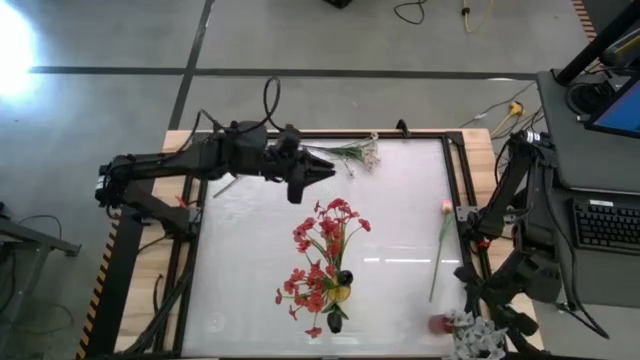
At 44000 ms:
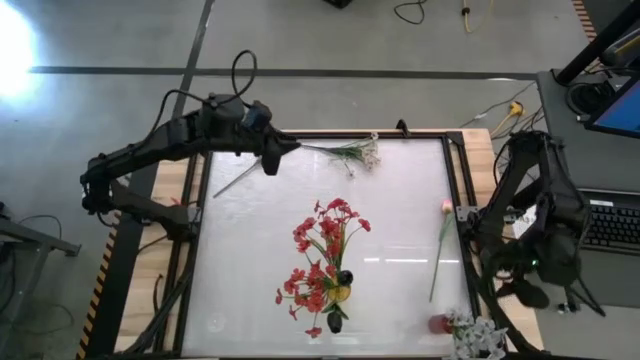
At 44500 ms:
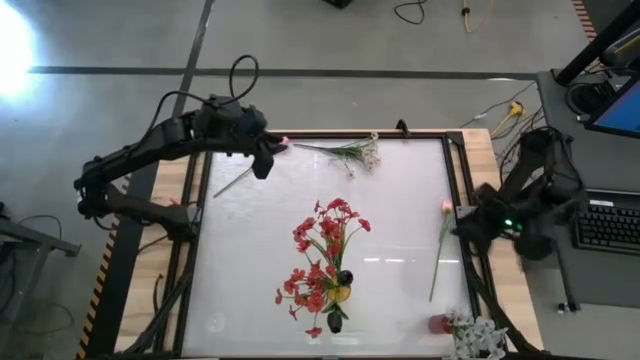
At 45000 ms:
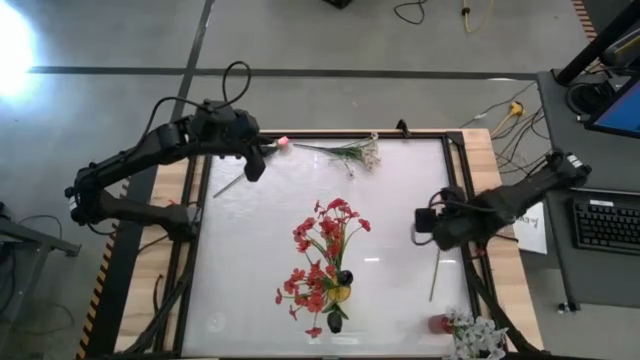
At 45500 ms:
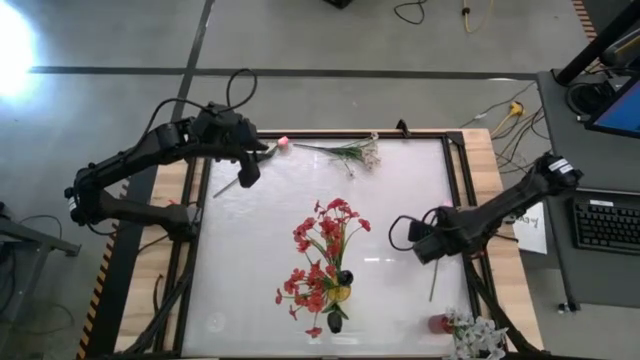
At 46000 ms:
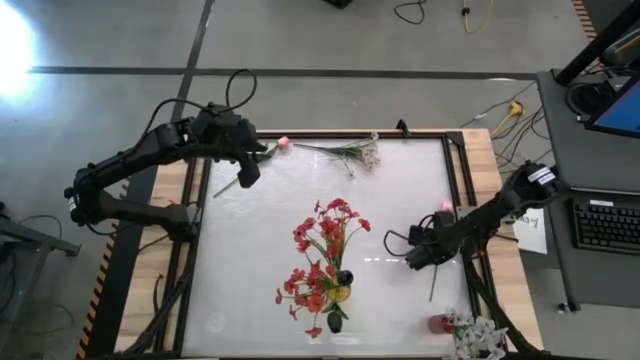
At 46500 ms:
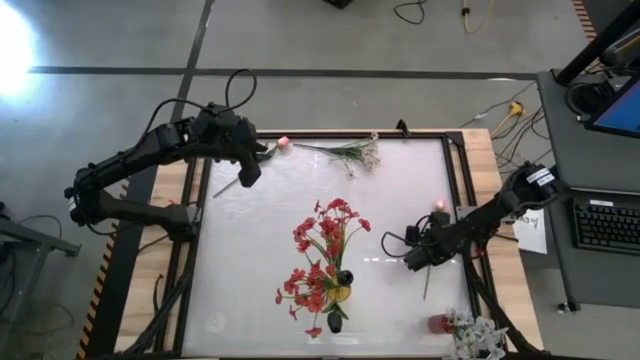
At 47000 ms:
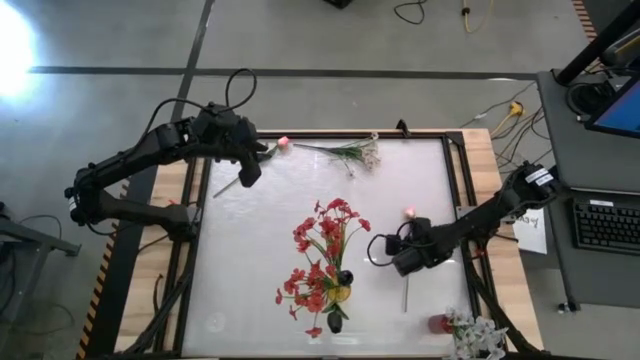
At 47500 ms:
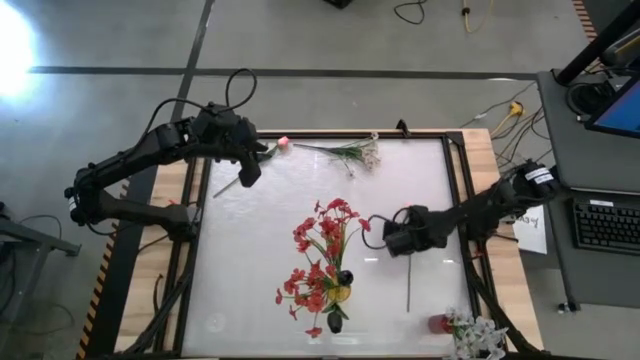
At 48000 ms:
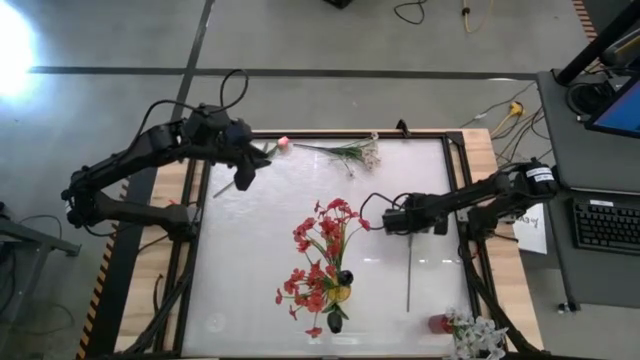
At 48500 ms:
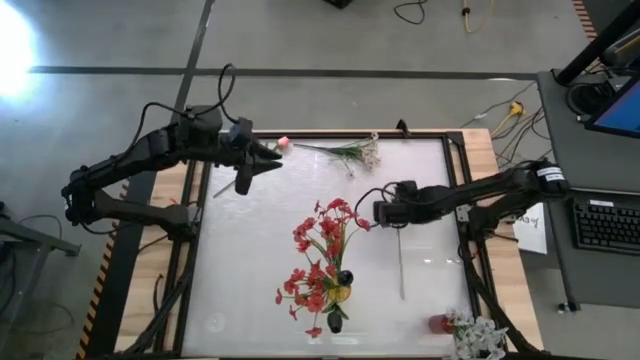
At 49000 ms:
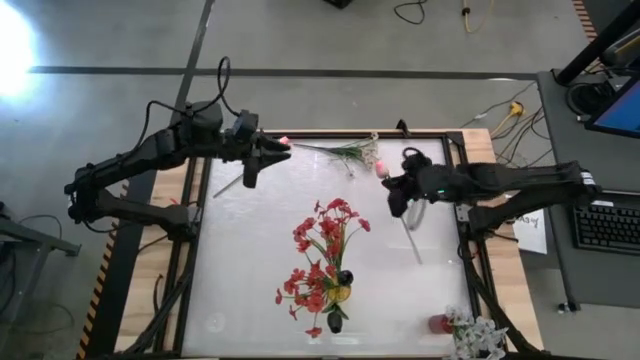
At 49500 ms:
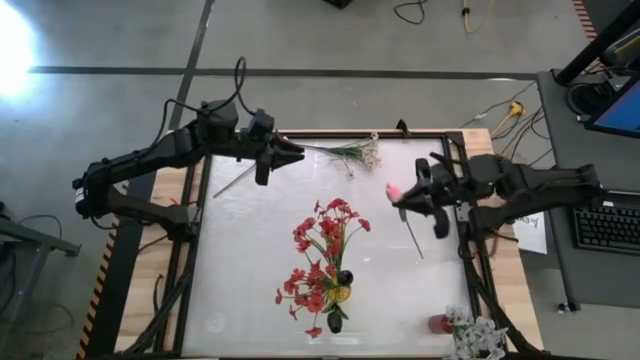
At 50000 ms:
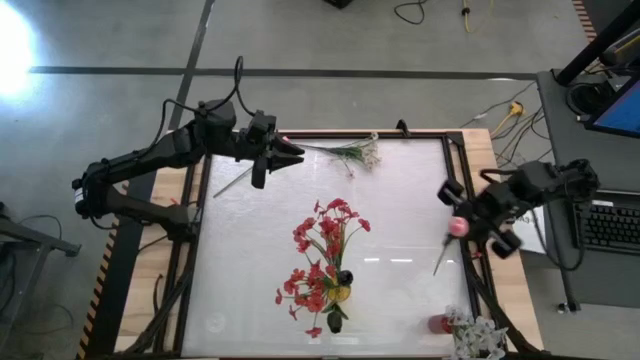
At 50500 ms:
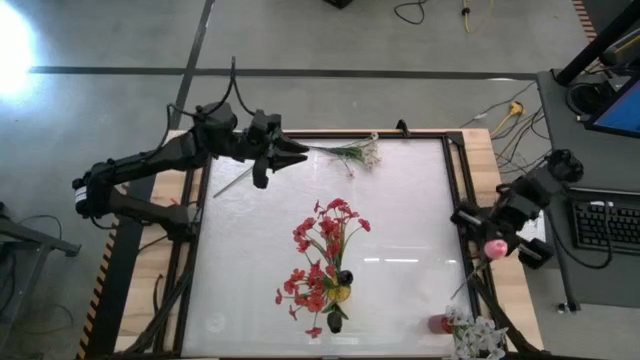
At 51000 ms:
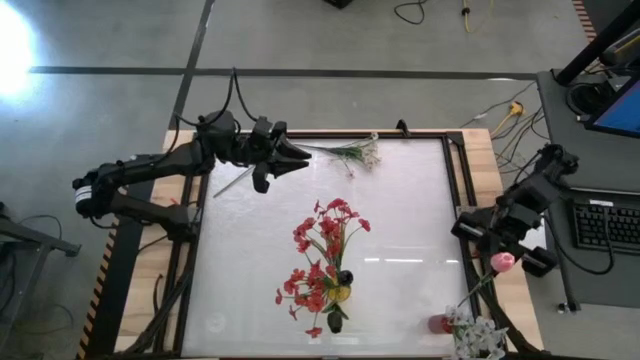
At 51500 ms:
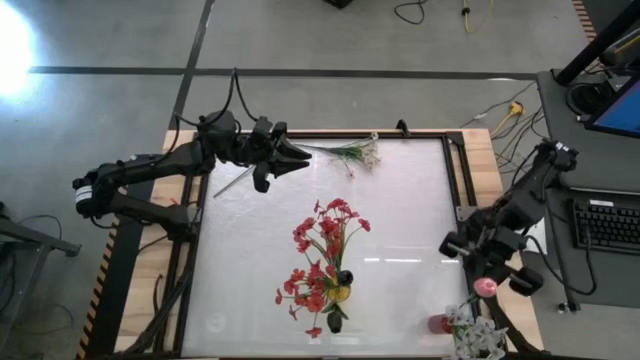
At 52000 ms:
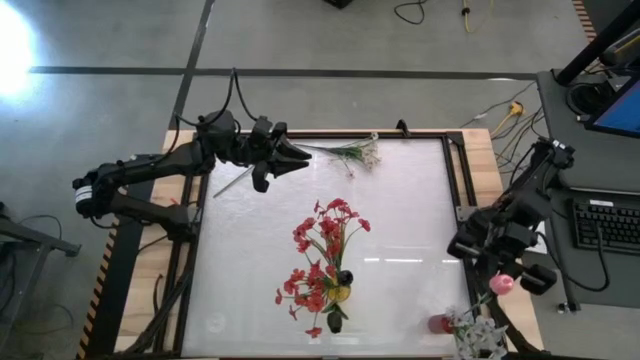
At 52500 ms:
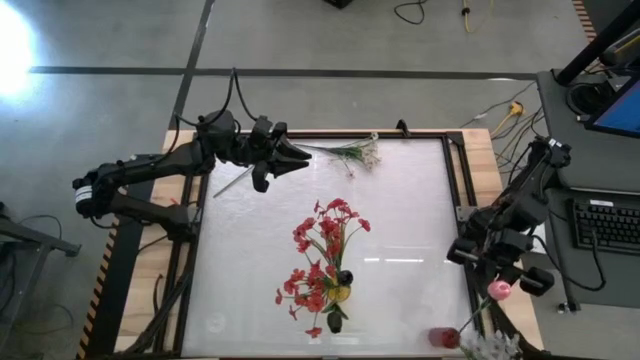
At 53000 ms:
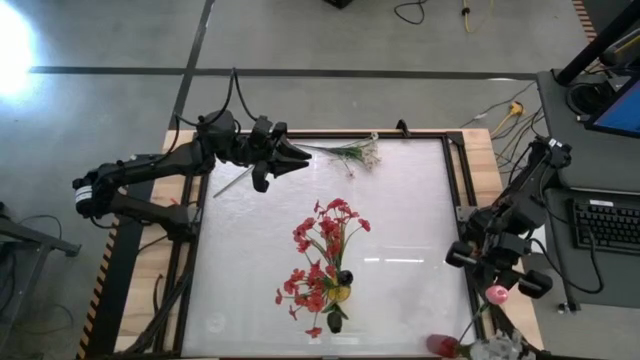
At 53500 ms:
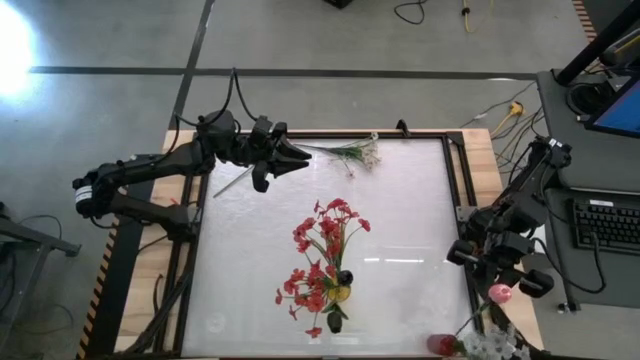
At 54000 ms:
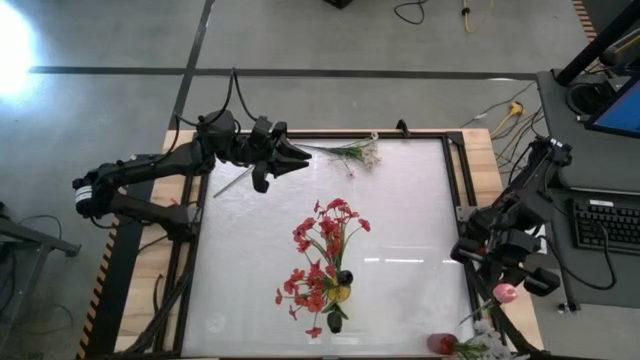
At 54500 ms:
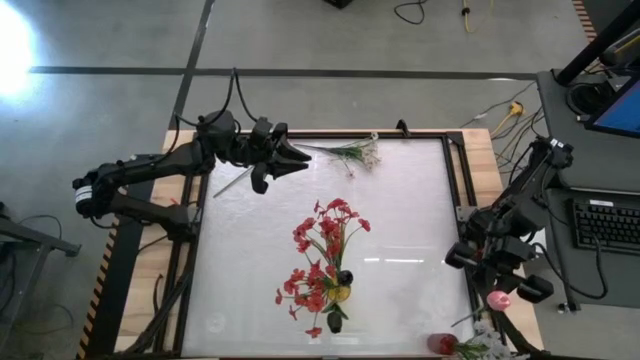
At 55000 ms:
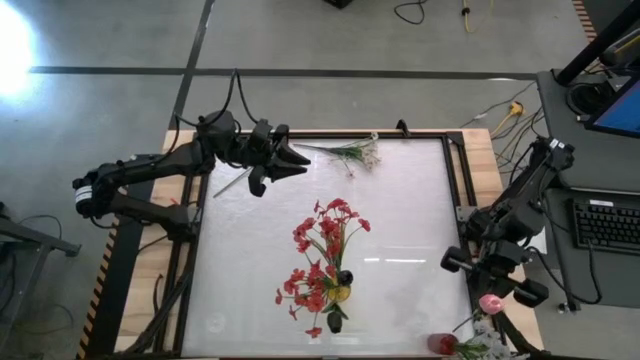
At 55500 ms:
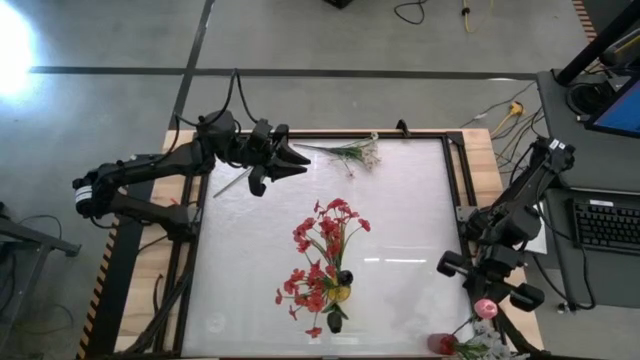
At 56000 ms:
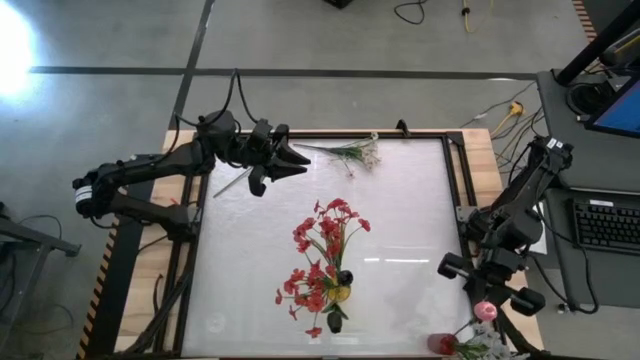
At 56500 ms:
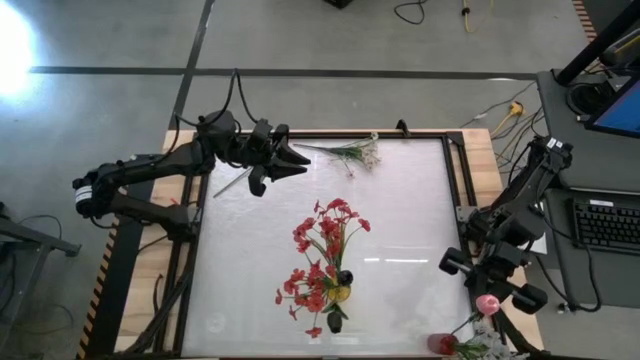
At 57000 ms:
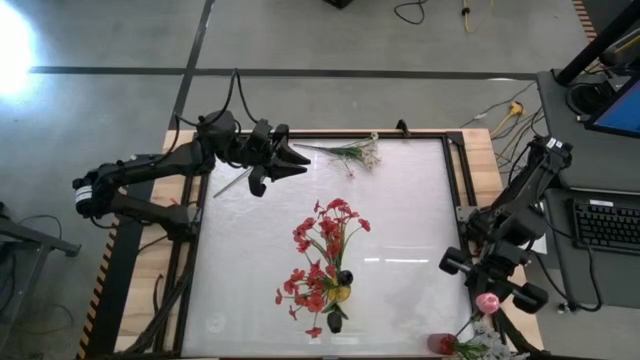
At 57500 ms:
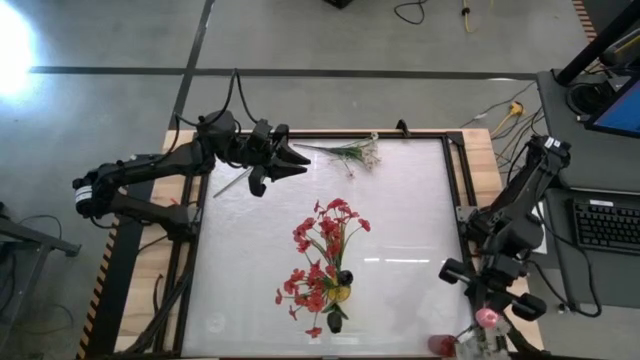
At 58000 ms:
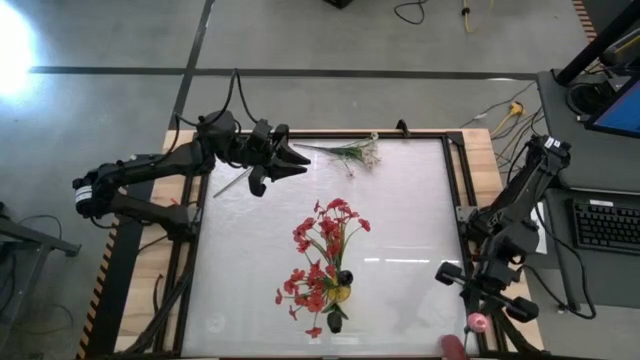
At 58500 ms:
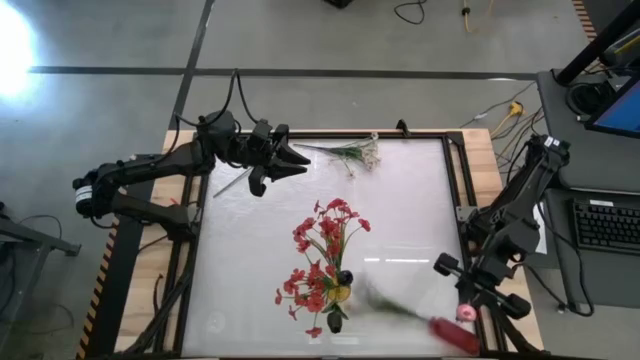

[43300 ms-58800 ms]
Task: Sort flowers into vase by color
Put the right pink flower into the red vase

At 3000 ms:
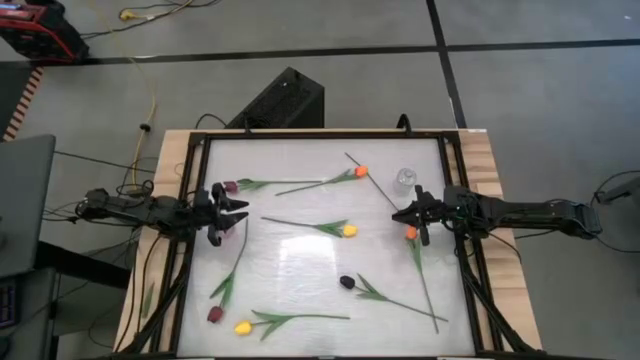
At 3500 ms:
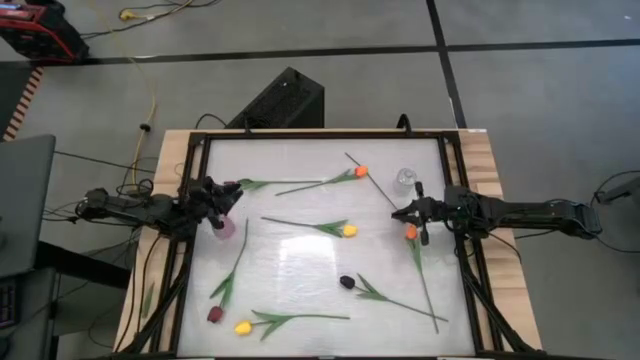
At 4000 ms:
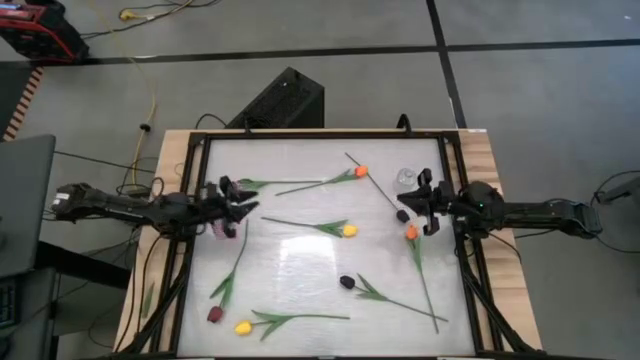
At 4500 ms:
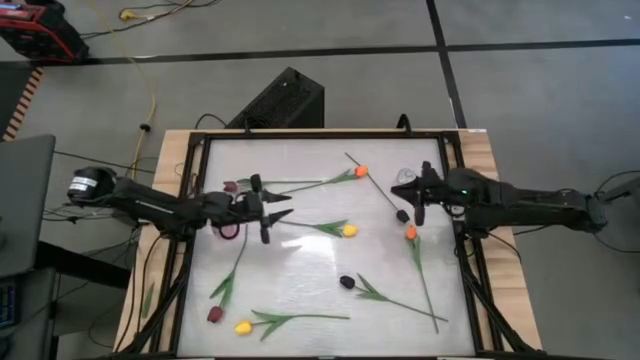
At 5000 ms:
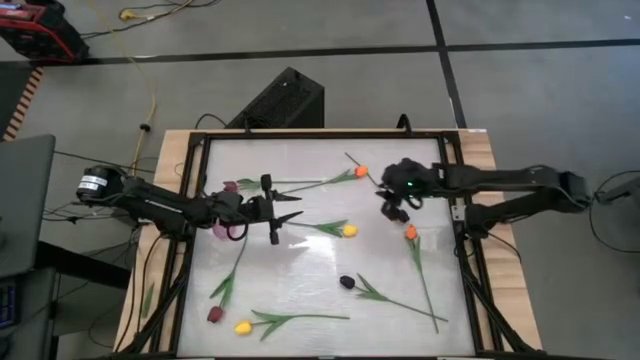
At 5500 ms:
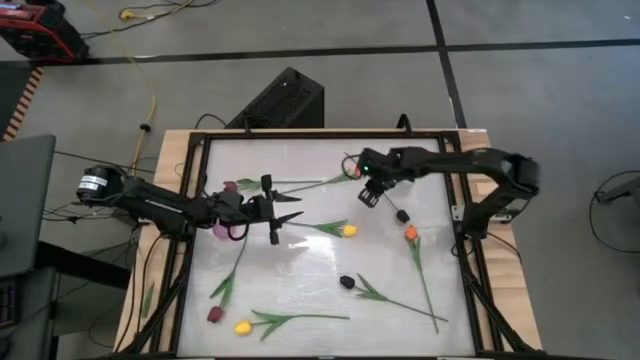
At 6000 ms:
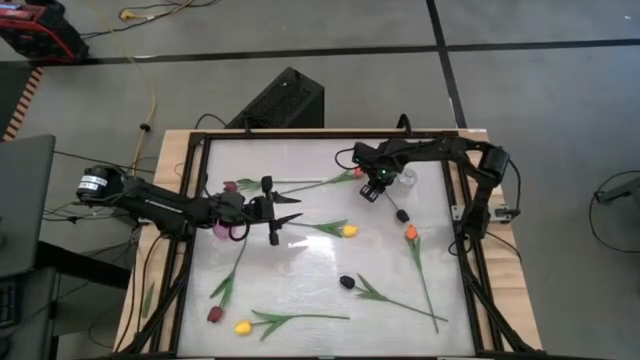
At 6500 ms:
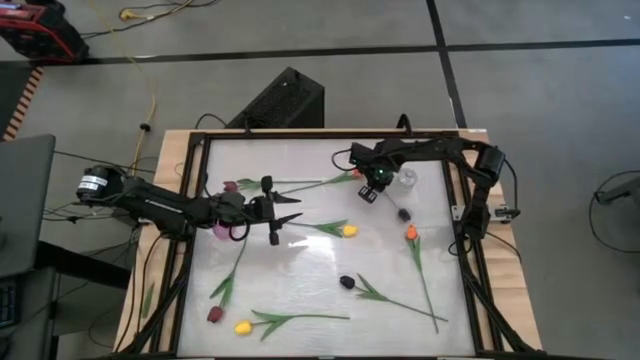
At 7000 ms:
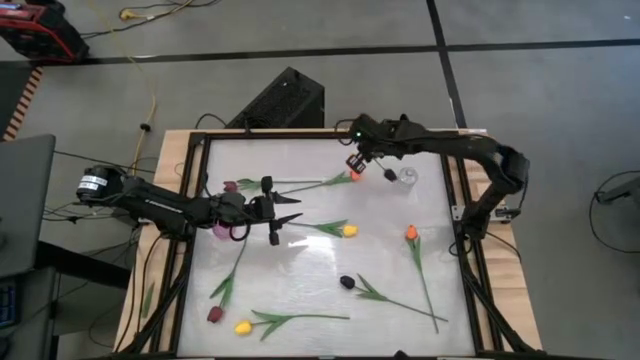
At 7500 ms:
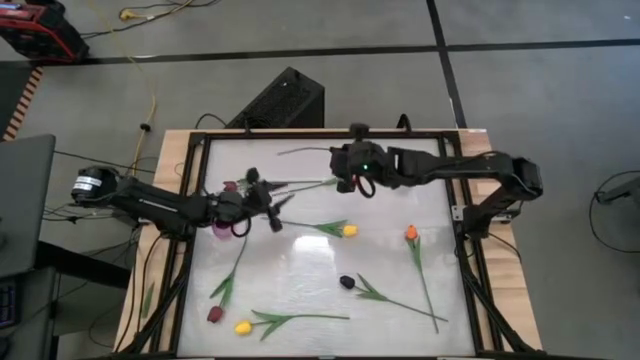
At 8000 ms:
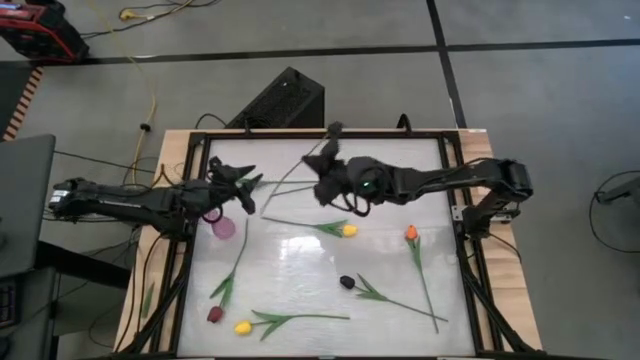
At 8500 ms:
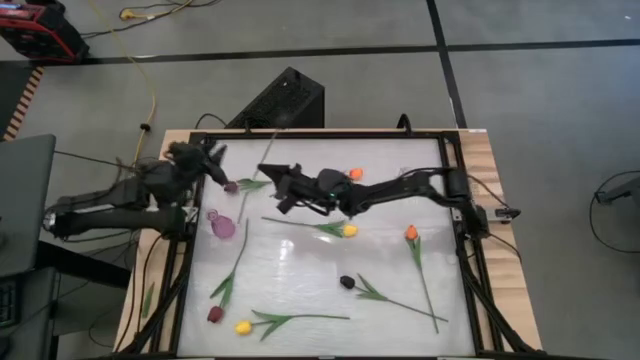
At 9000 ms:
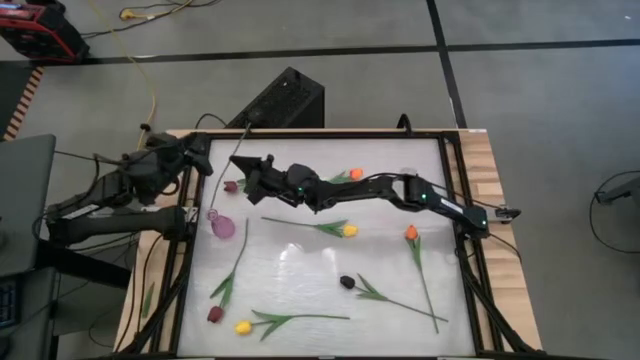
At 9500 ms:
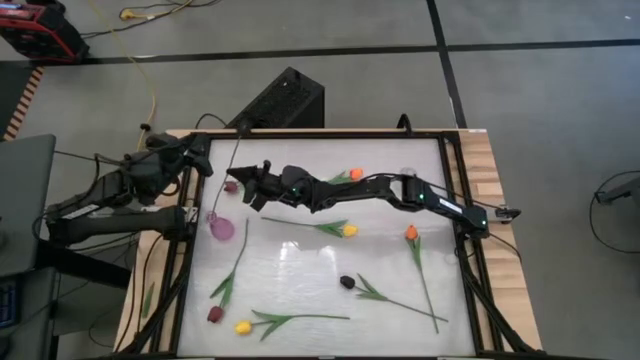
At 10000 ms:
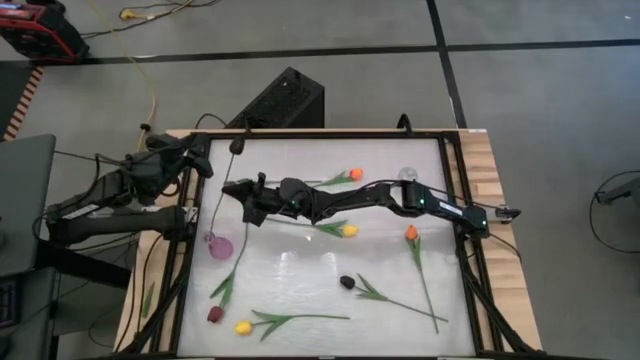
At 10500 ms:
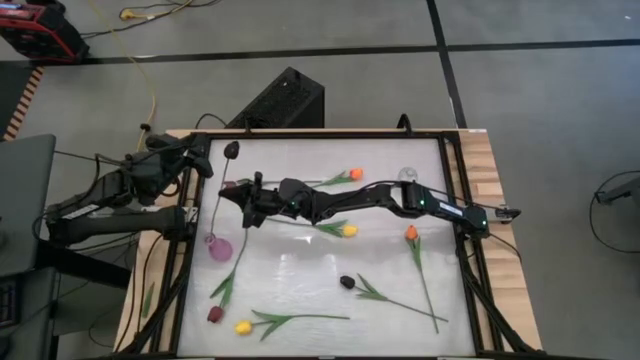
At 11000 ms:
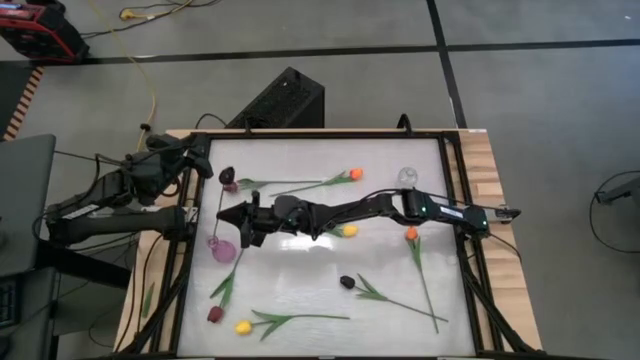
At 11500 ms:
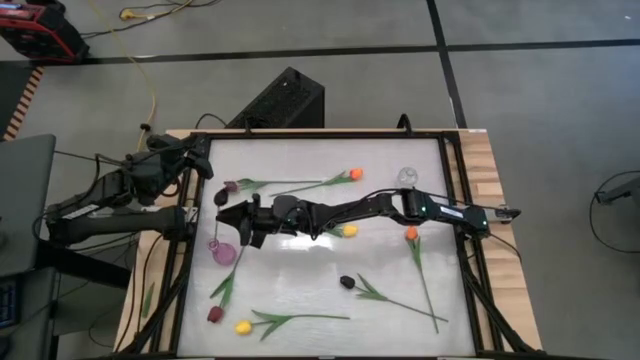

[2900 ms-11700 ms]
Task: Sort flowers into vase by color
Put the top black tulip into the purple vase
